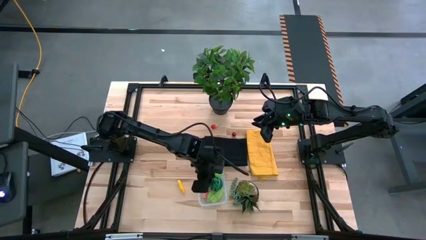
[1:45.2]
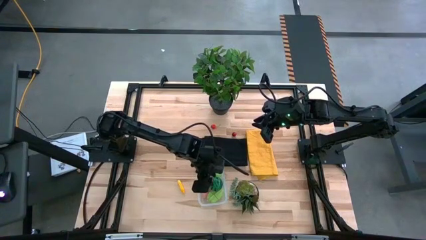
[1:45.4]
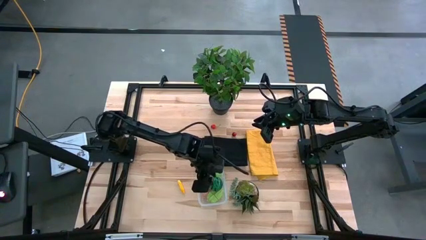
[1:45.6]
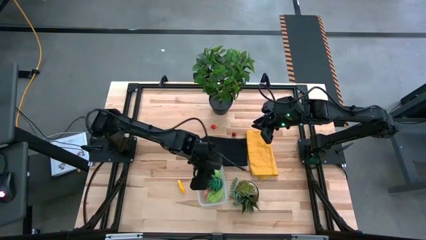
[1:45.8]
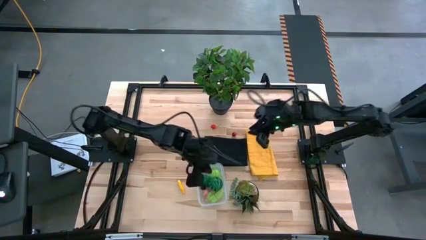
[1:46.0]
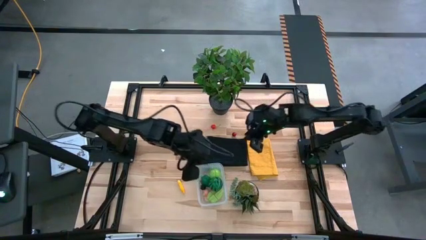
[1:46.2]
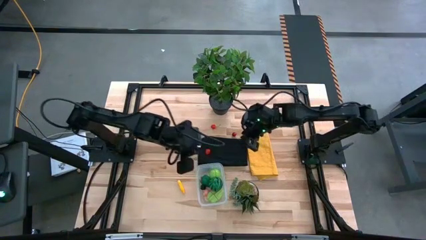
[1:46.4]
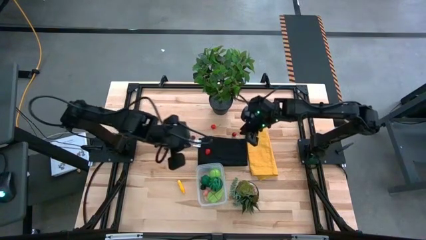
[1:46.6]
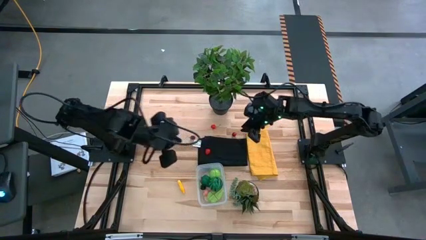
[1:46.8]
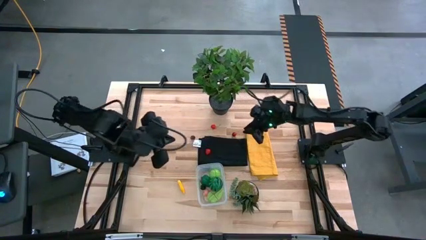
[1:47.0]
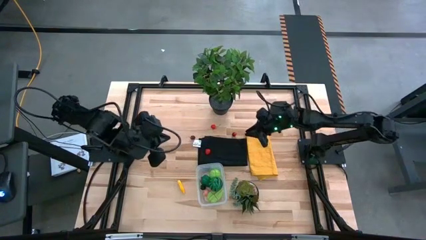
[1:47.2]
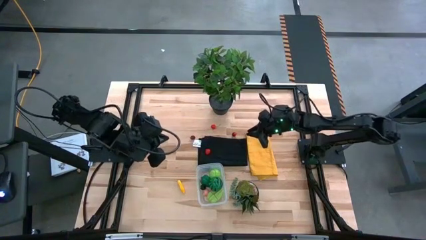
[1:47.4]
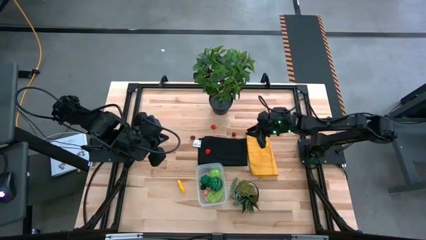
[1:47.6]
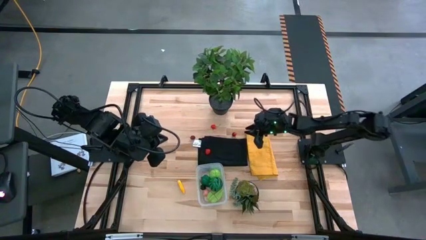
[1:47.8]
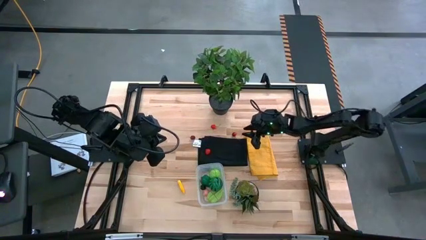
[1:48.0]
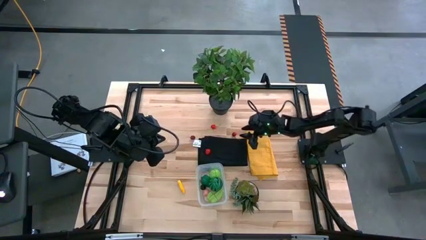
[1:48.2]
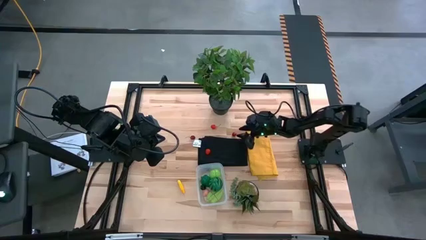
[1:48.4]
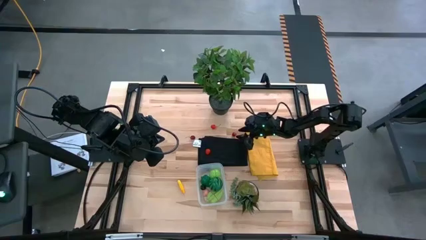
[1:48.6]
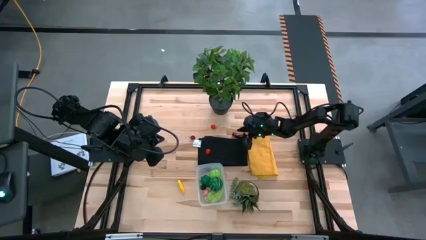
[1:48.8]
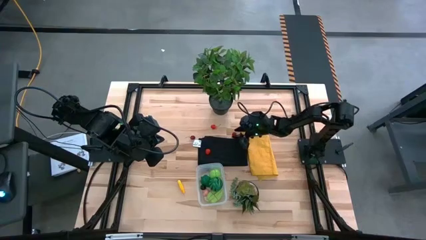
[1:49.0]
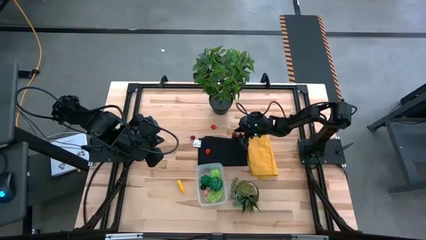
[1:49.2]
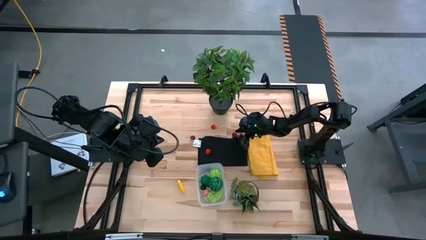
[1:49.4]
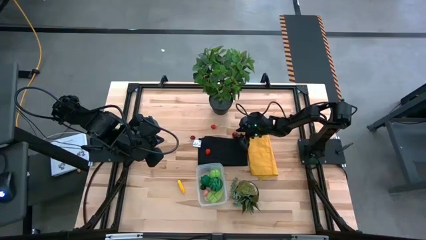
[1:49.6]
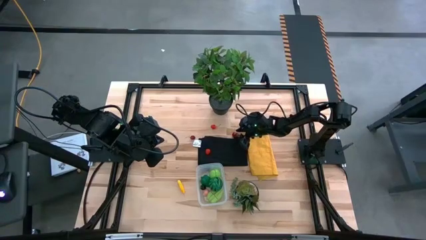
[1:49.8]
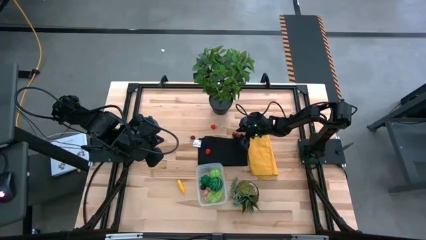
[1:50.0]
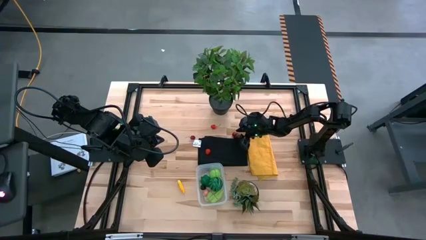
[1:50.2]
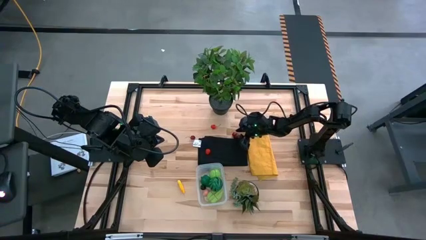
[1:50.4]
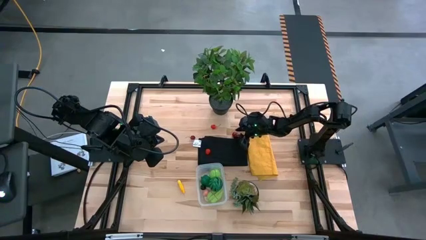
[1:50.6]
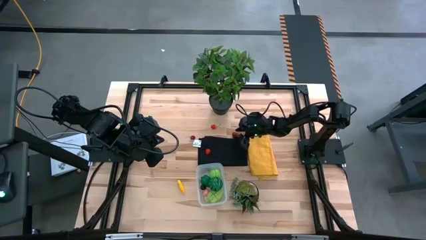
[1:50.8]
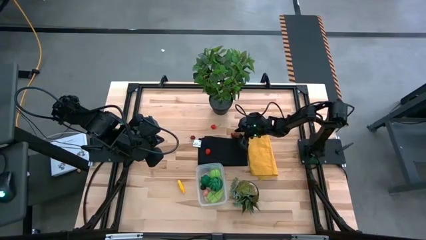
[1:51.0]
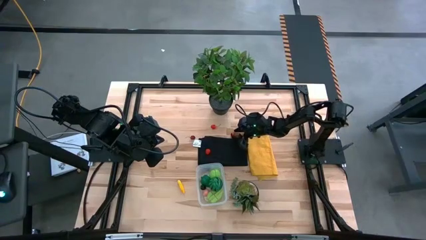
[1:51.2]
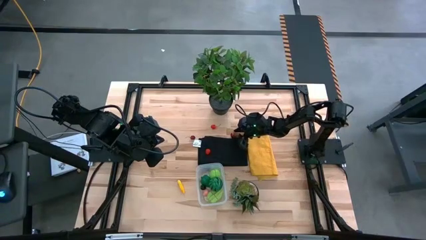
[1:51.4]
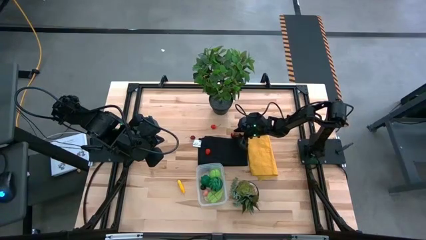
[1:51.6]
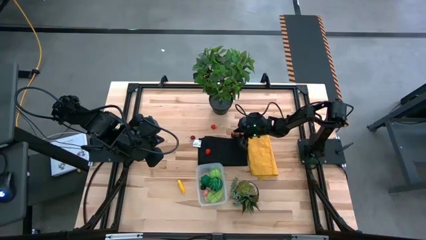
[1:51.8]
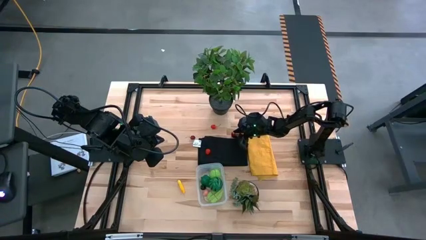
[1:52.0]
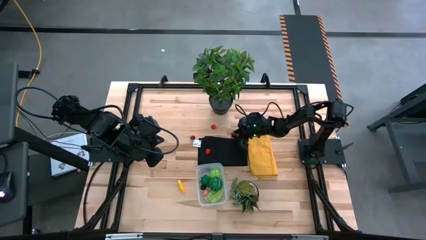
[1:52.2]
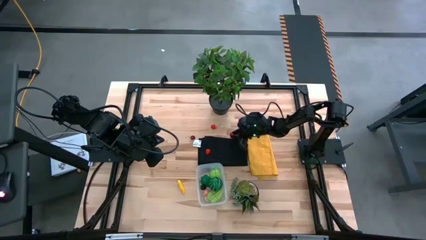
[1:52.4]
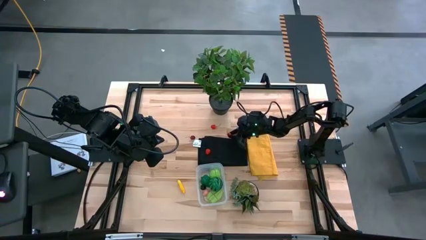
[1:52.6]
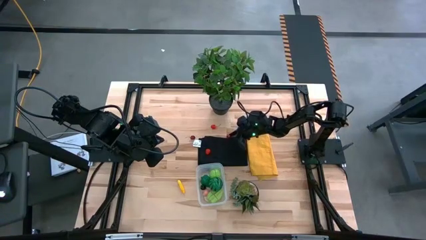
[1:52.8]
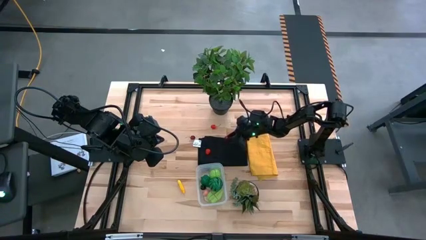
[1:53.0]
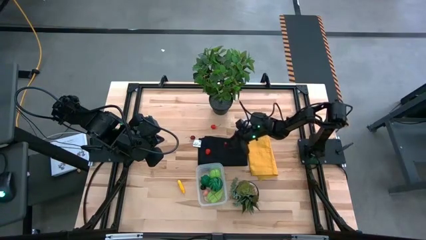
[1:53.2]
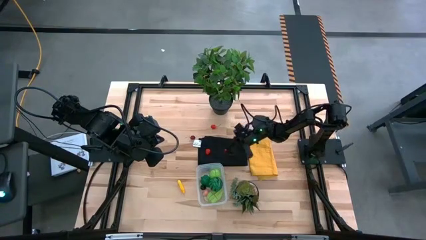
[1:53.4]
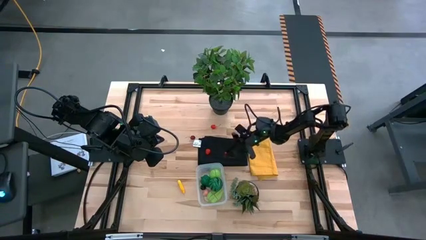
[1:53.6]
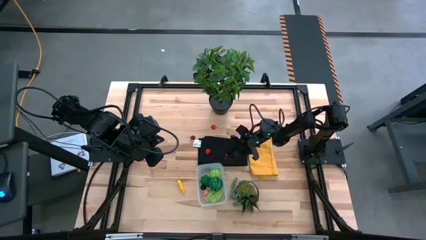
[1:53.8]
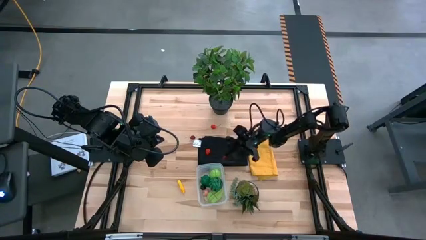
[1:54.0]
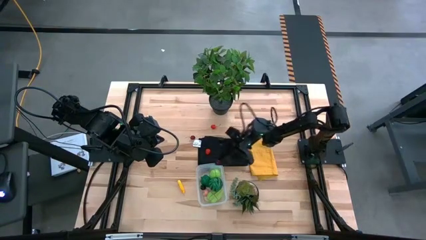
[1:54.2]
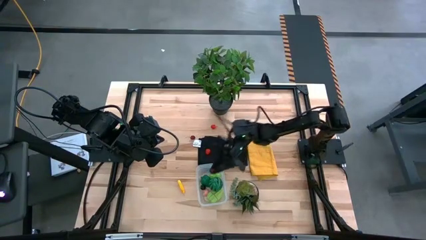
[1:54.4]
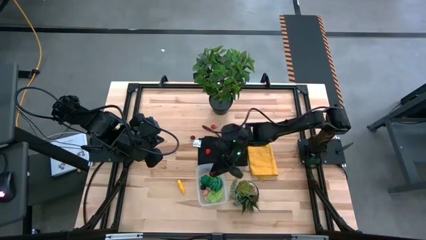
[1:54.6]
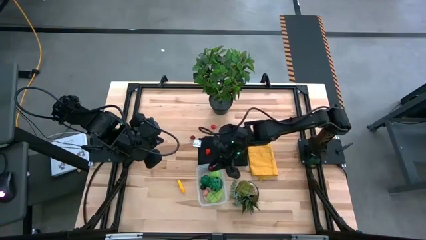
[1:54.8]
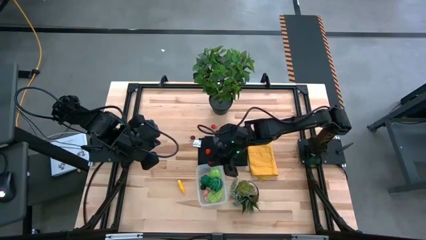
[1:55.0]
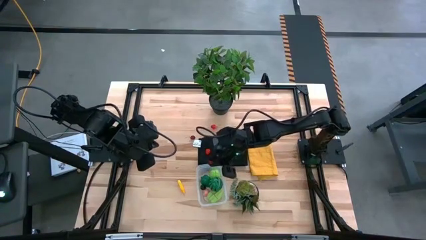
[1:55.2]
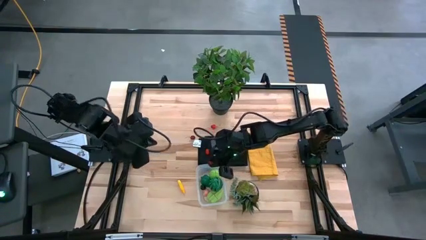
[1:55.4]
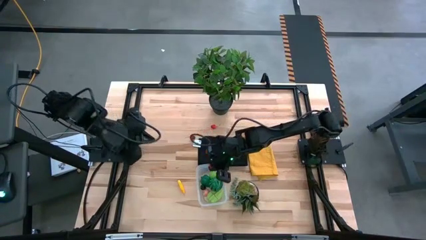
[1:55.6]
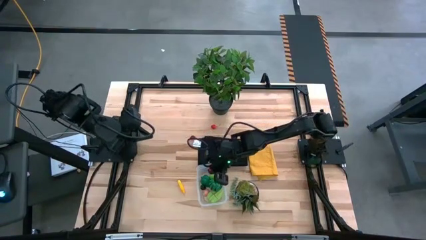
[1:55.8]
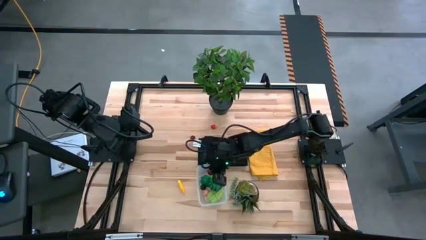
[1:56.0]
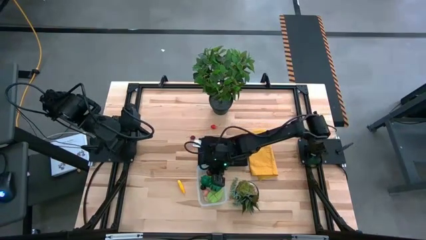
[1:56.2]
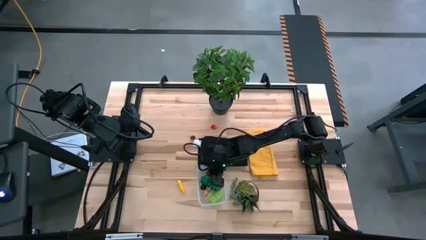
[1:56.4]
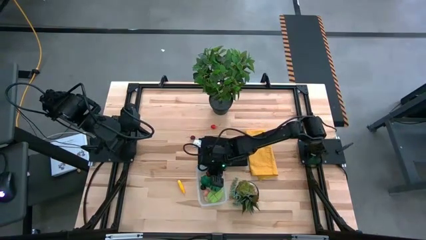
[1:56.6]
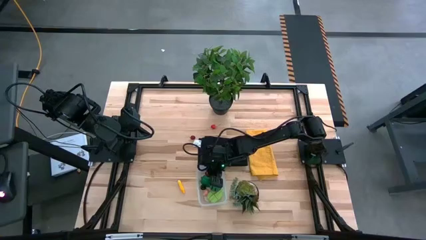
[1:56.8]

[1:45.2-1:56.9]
Task: Pick and placing Produce into tupperware
Put the right cherry into the bin

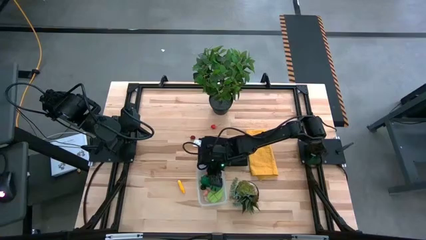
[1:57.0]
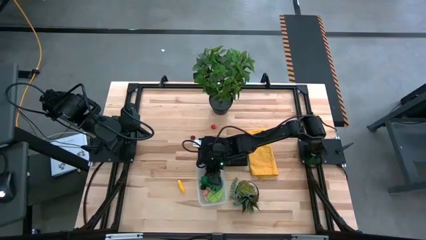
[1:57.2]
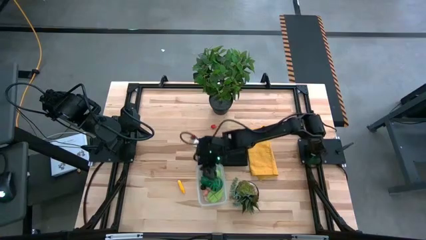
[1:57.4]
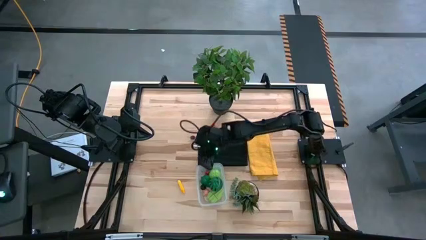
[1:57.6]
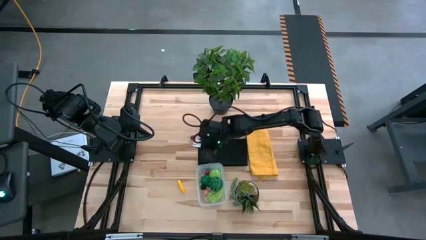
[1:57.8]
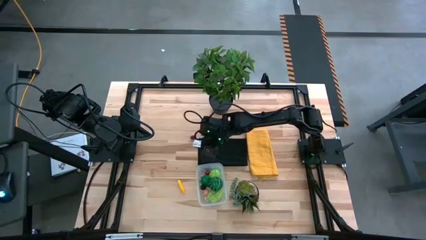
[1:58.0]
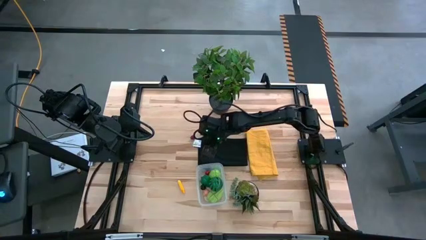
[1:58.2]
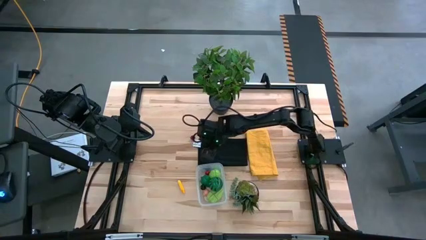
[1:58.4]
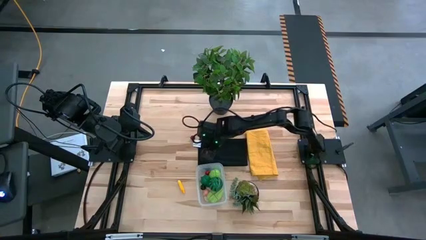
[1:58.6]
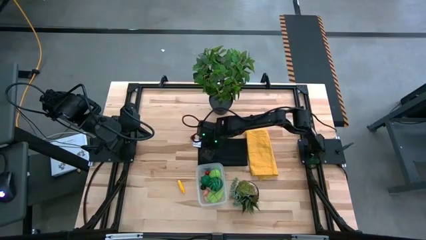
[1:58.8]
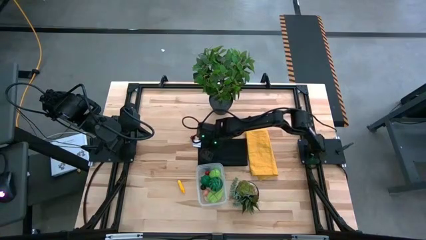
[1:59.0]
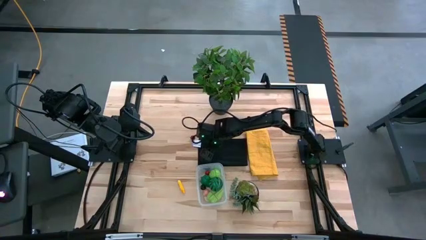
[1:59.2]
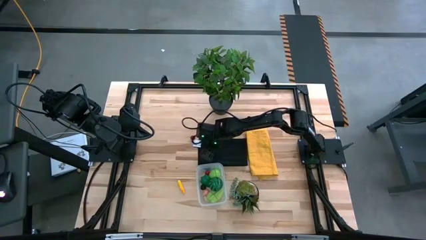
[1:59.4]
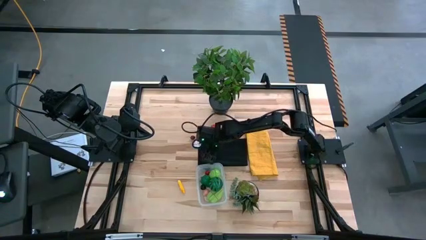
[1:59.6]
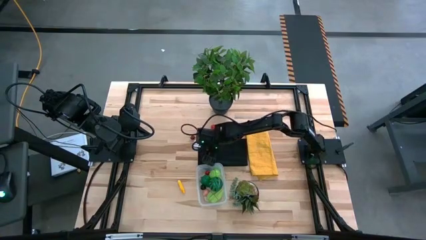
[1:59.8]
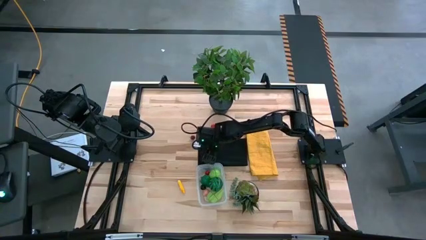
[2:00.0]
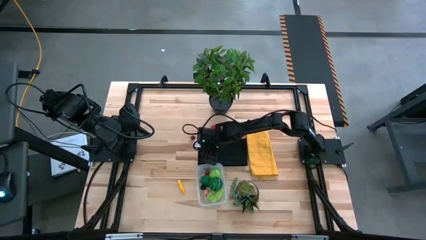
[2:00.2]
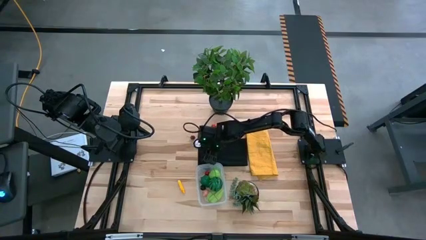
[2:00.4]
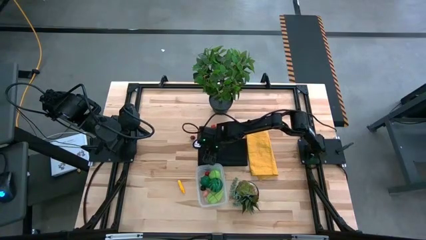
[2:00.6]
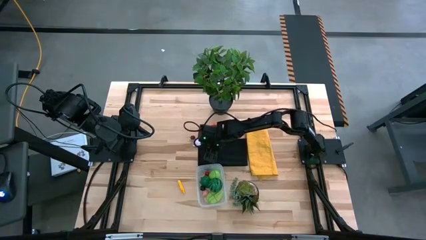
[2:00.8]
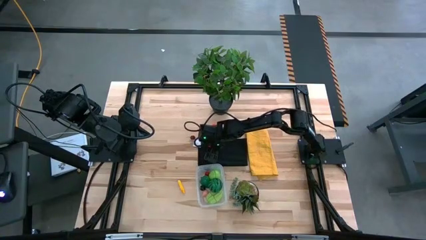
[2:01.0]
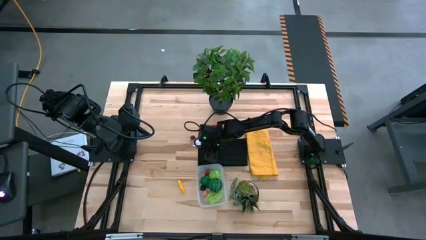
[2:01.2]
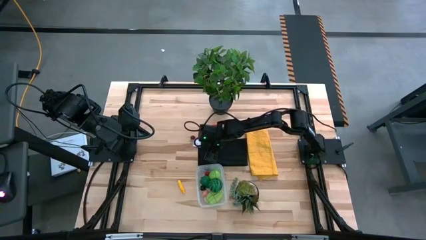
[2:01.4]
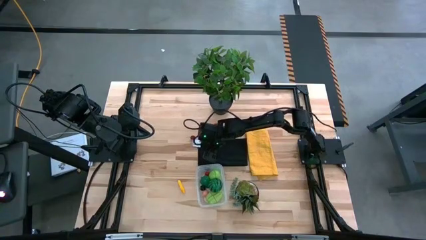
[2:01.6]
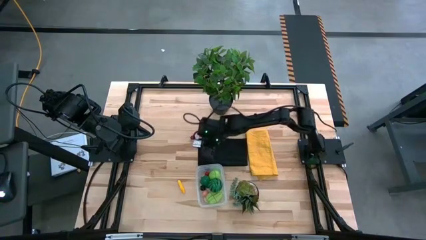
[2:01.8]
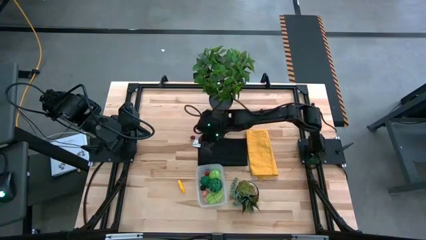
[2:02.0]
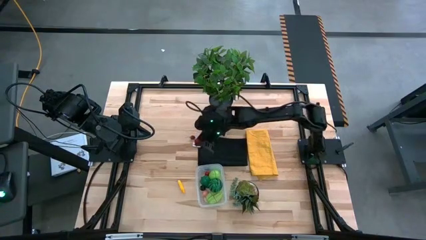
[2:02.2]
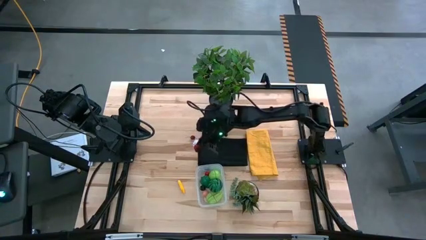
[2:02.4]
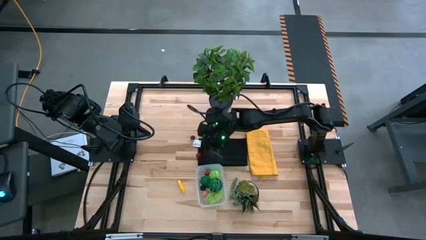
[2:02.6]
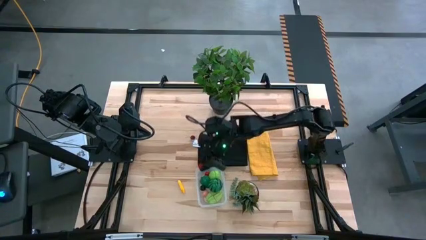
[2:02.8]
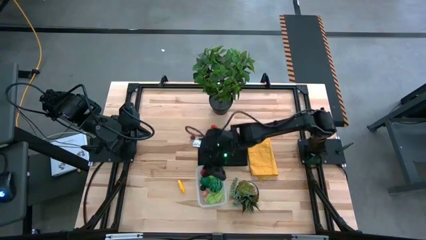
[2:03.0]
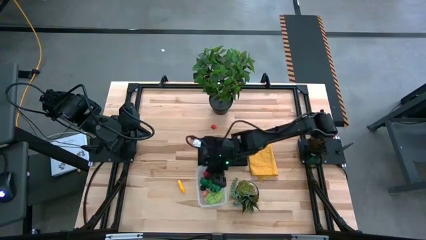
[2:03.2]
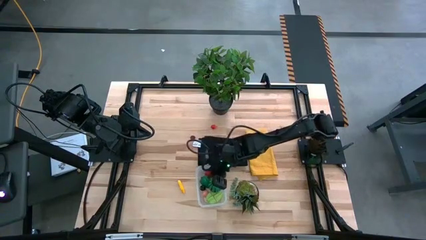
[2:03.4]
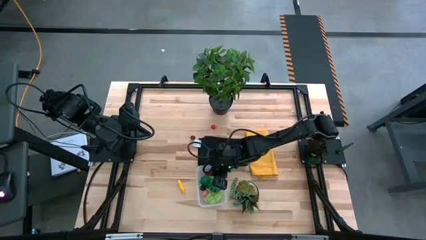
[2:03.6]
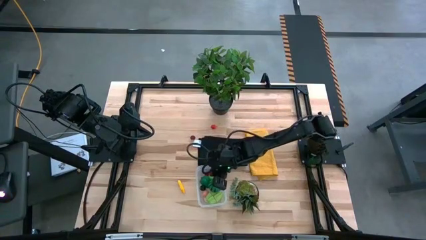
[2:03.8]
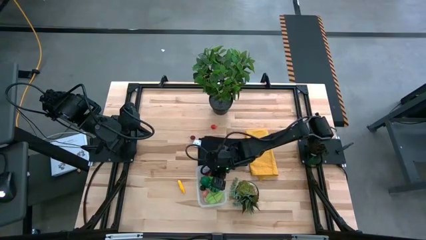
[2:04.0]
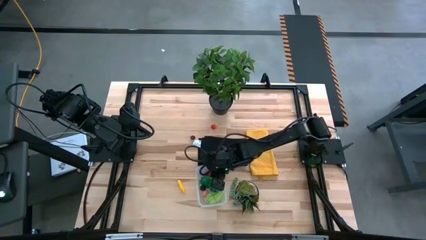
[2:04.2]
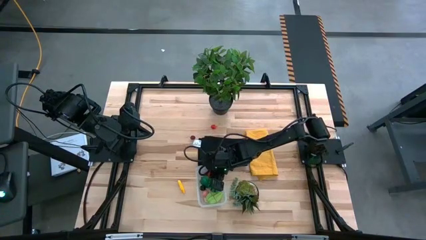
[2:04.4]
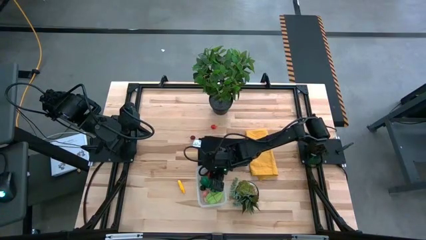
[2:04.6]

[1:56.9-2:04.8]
Put the raspberry into the bin
